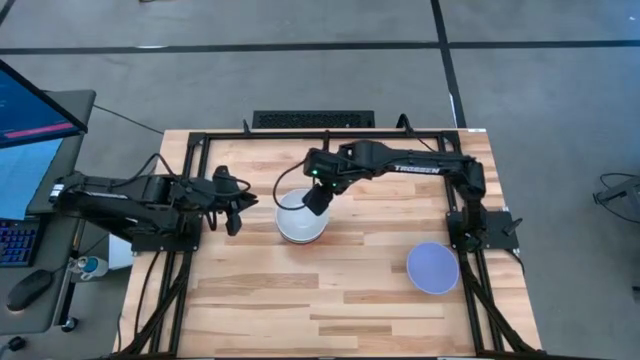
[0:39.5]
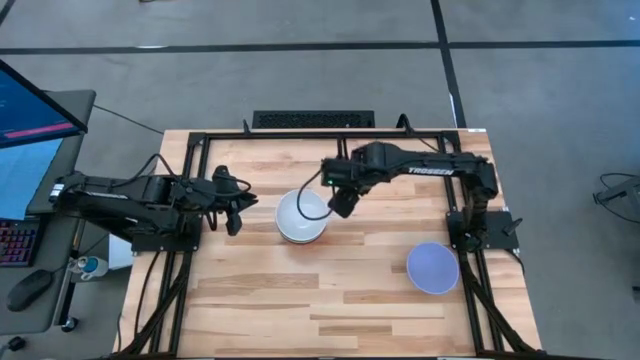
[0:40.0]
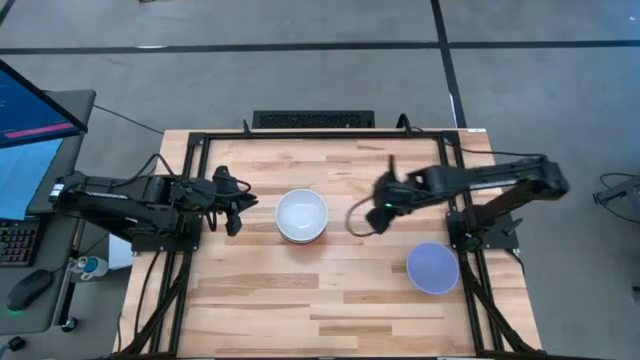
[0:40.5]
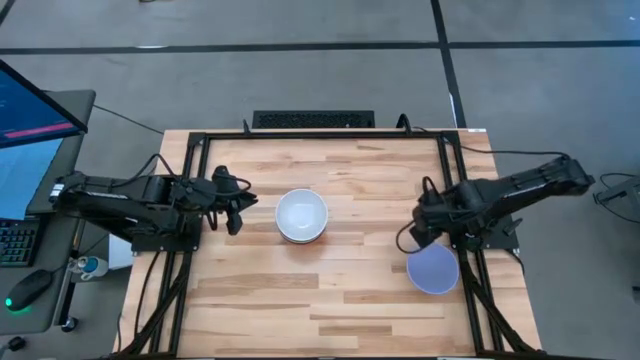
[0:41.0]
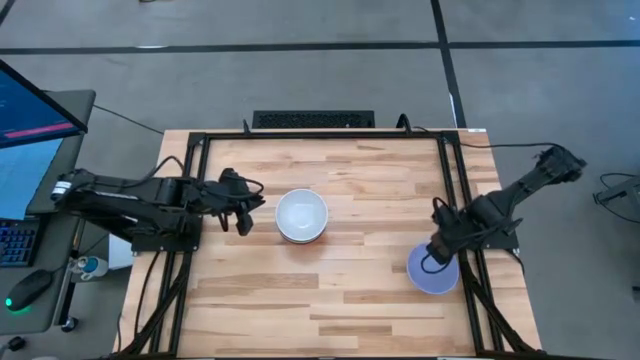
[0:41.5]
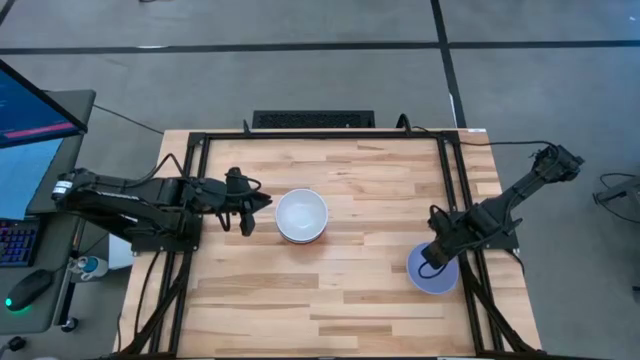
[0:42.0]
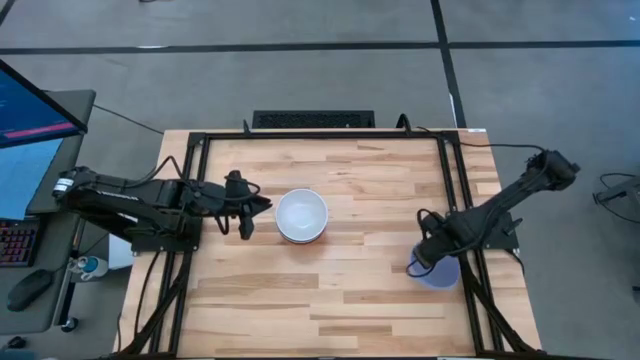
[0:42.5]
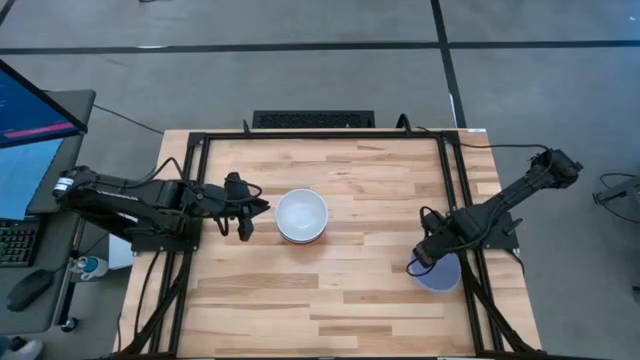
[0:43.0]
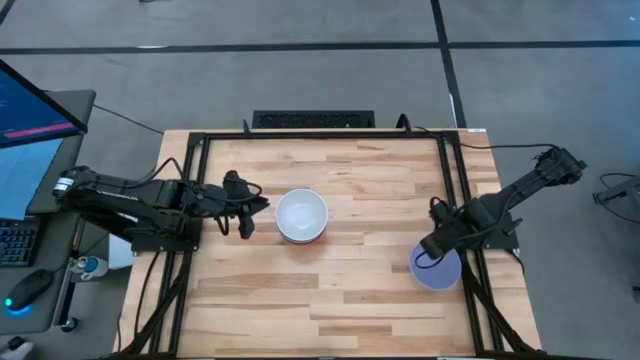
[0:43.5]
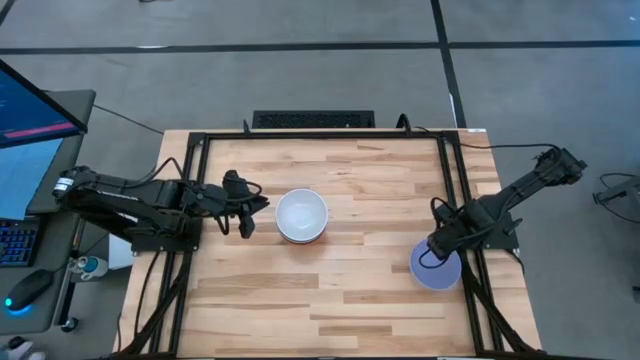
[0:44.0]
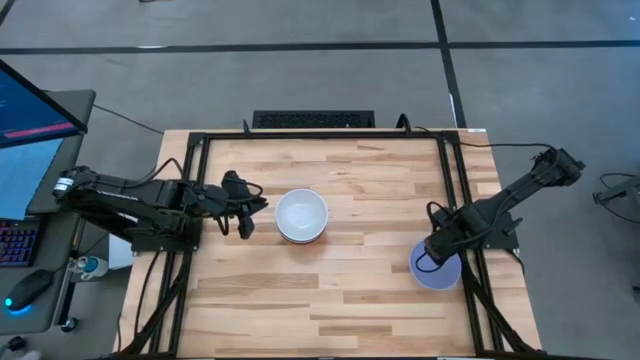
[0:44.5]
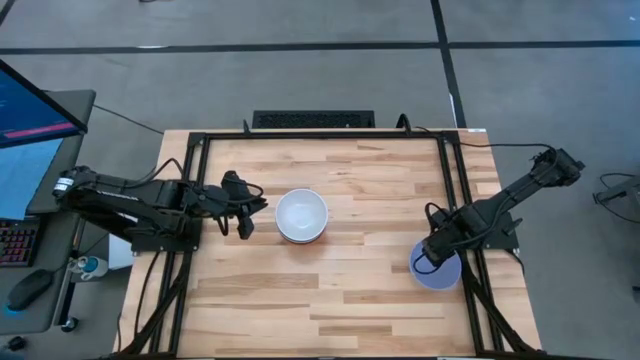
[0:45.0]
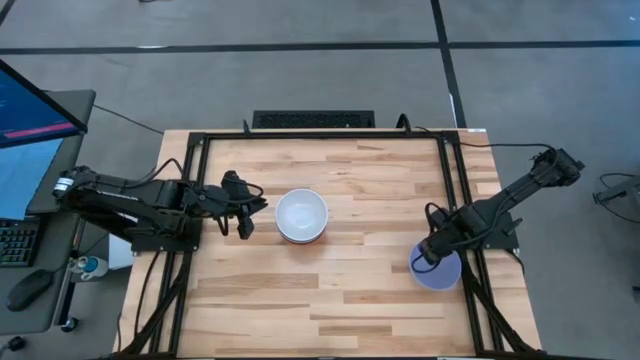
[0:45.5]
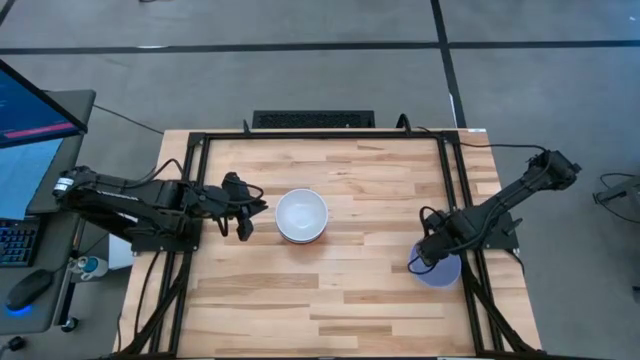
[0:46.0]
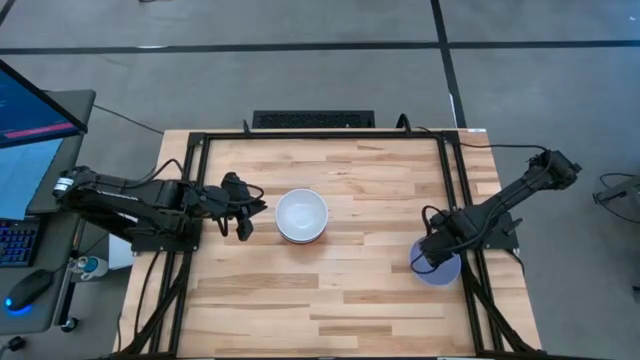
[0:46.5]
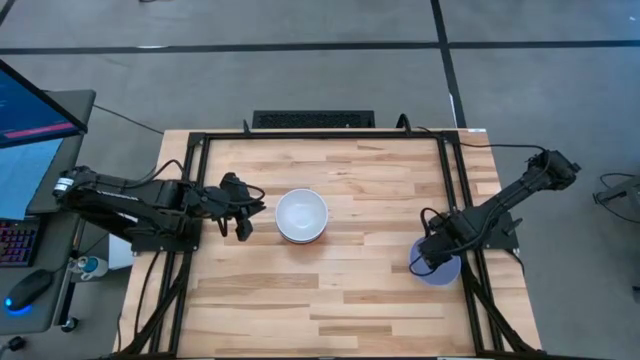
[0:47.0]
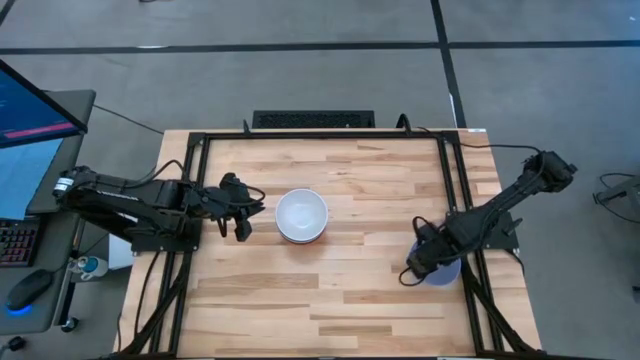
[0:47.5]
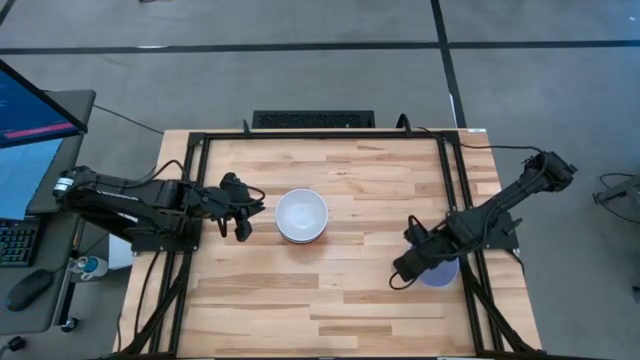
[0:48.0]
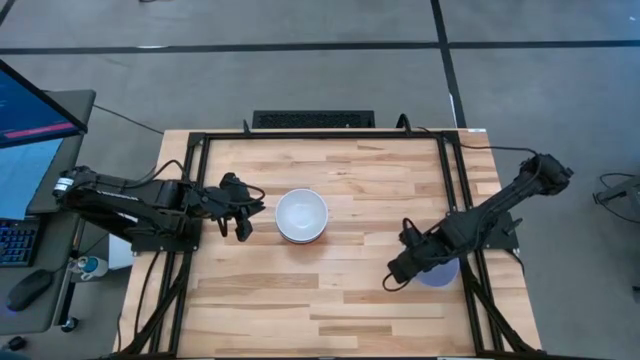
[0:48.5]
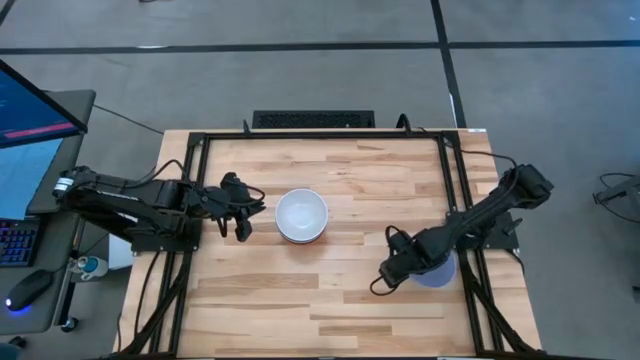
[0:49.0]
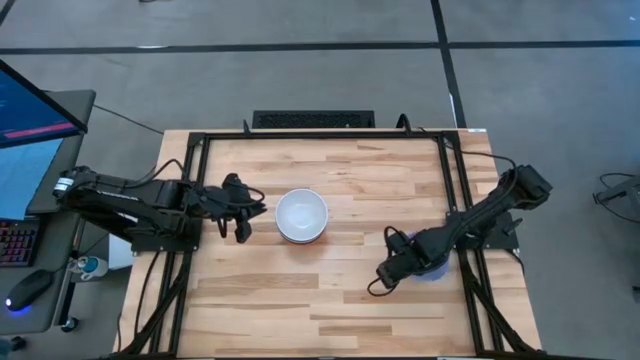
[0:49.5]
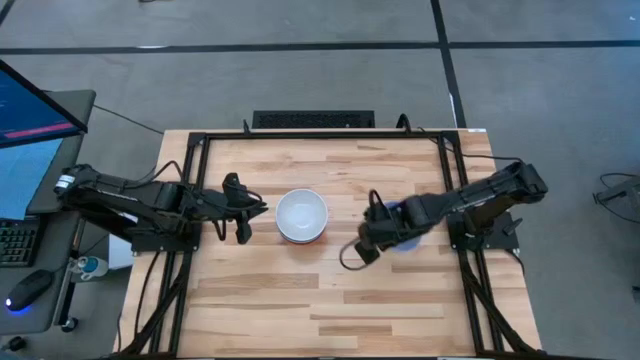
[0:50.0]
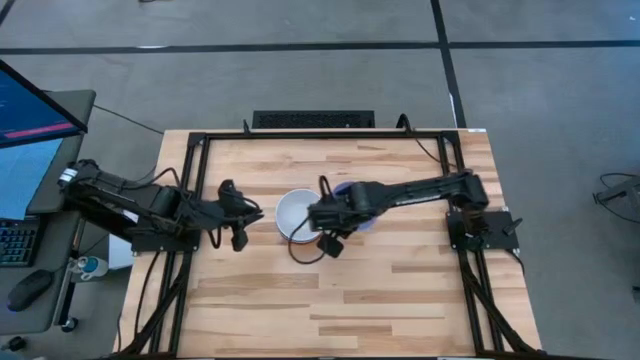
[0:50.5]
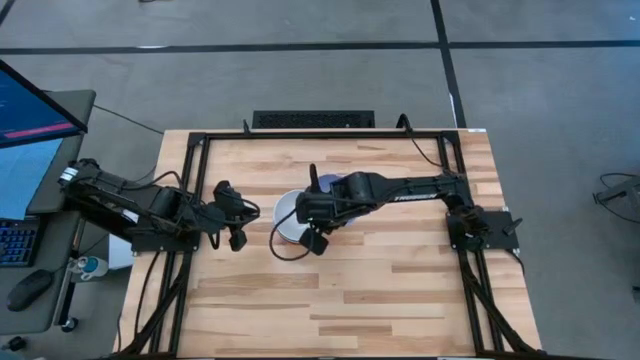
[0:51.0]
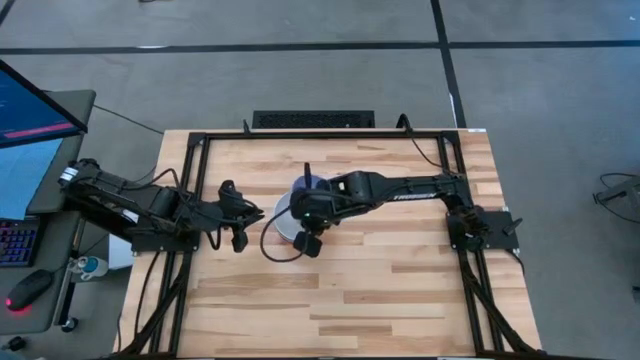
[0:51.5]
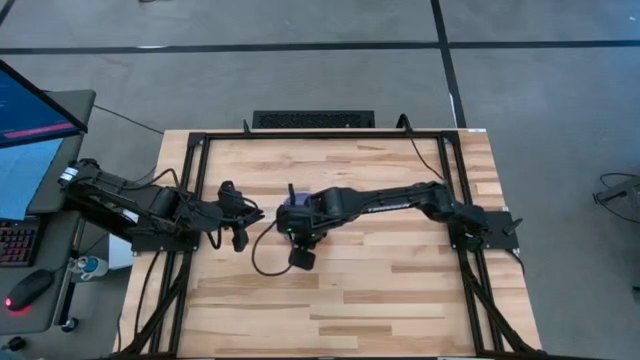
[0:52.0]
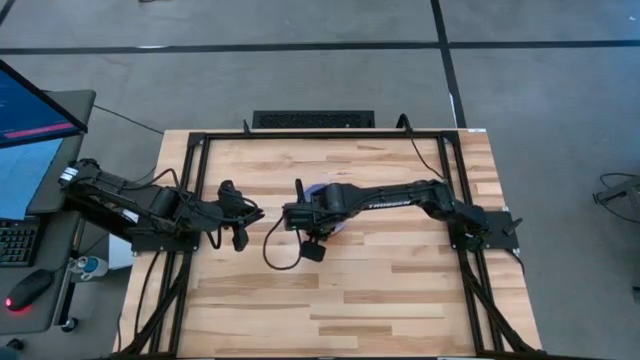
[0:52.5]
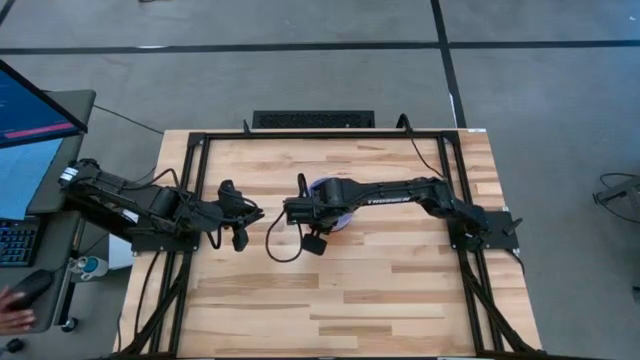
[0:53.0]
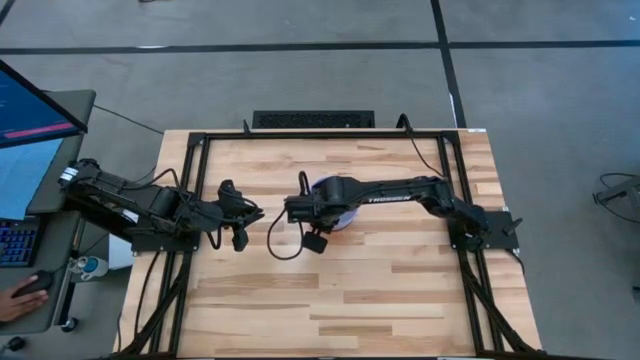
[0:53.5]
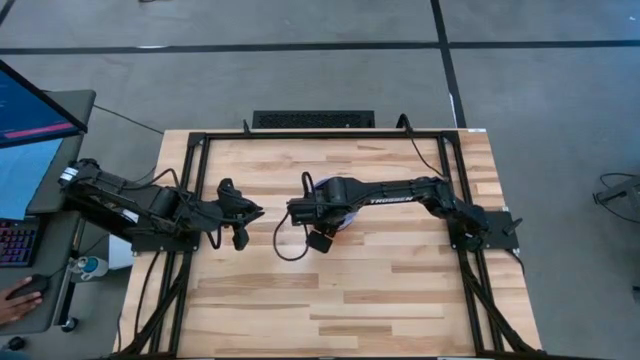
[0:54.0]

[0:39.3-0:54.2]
Task: Nest bowls inside each other
Stack the light blue bowl on the white bowl

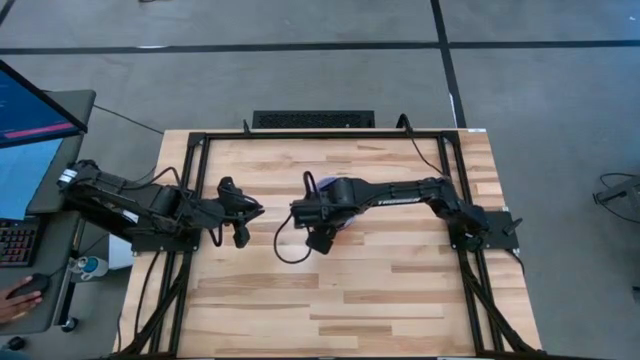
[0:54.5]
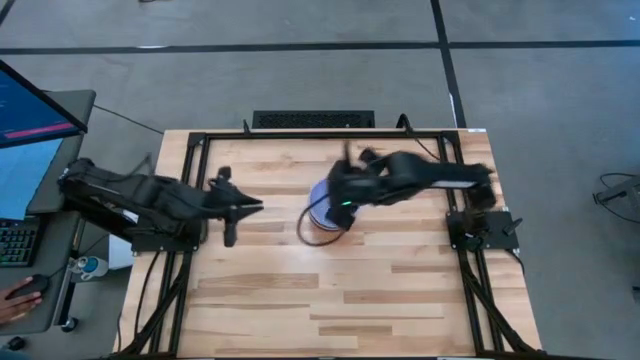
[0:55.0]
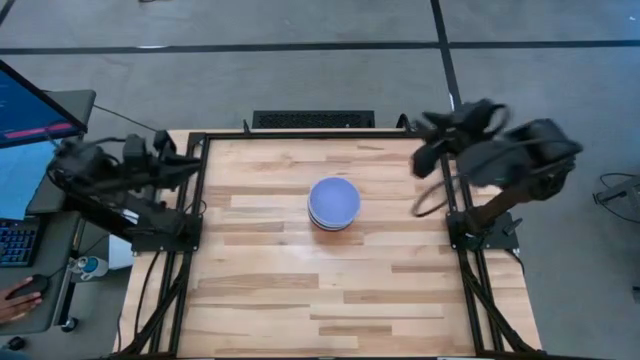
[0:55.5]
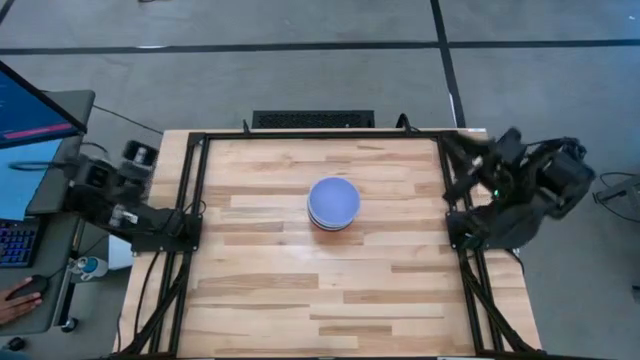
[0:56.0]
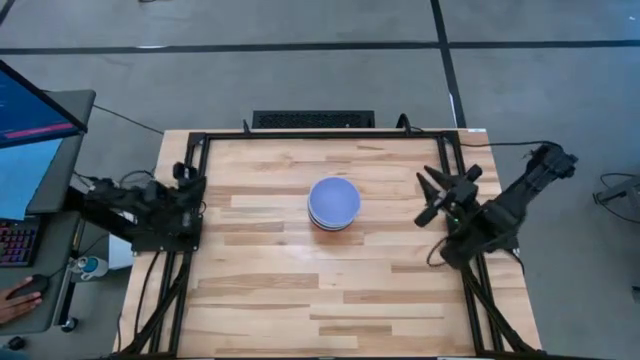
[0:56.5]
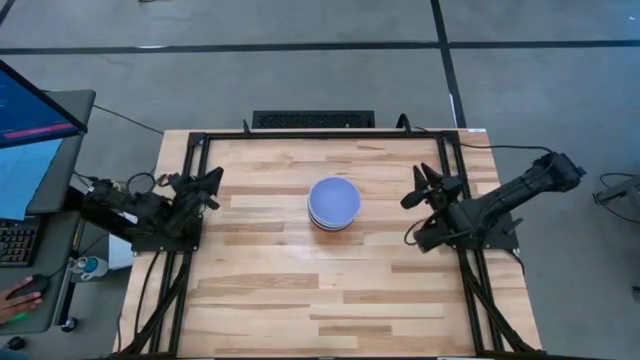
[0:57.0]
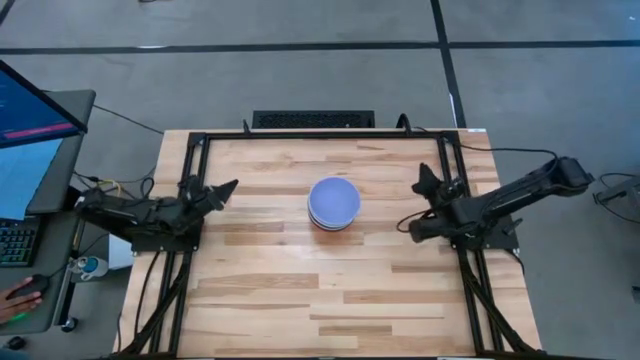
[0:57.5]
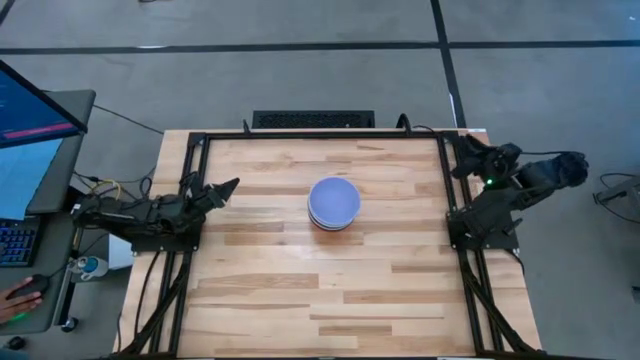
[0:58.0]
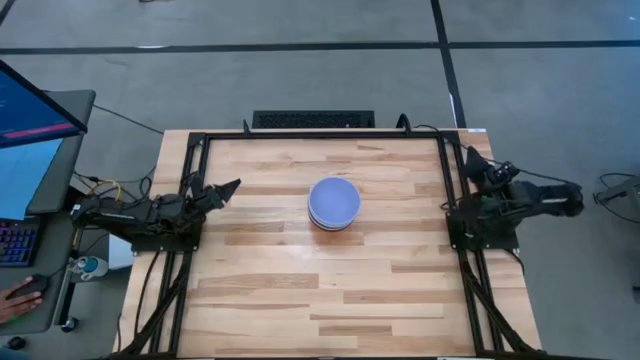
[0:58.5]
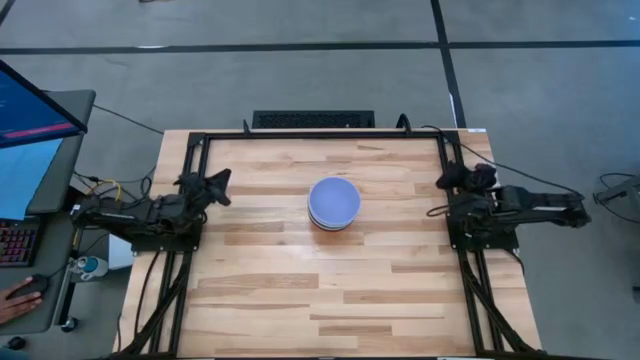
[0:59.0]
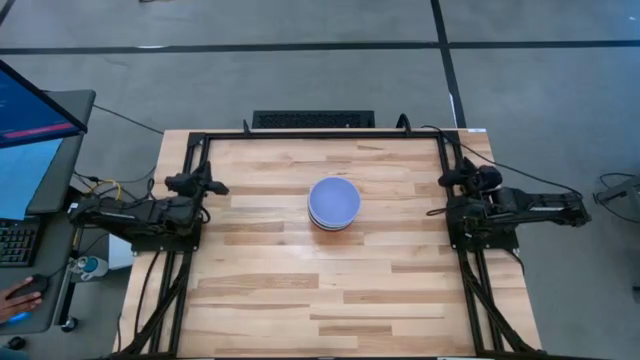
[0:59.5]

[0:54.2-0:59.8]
Return to Home Position
